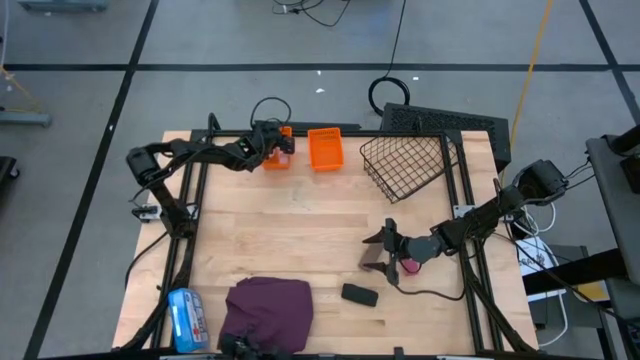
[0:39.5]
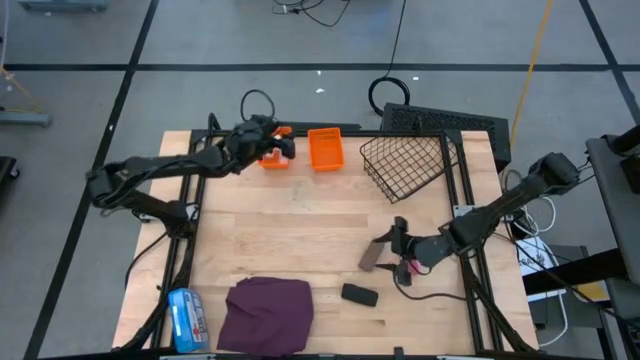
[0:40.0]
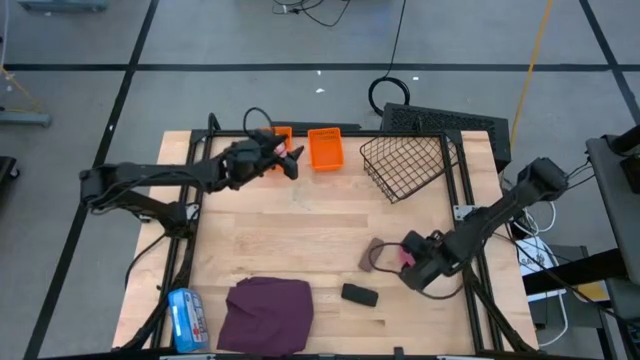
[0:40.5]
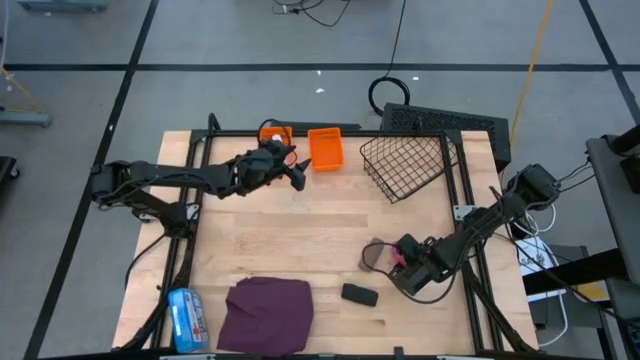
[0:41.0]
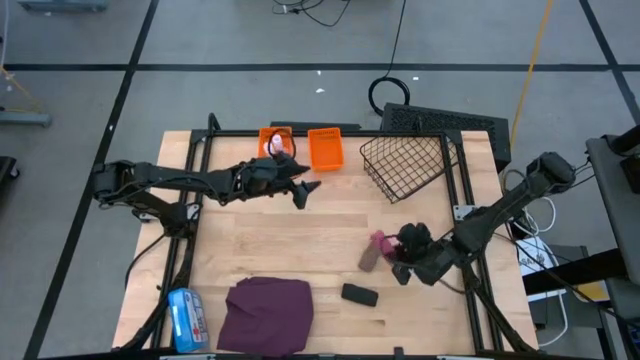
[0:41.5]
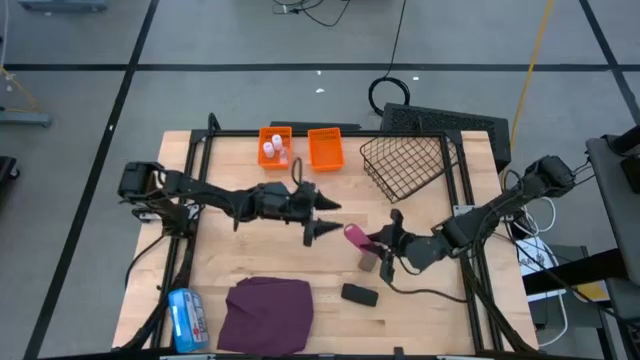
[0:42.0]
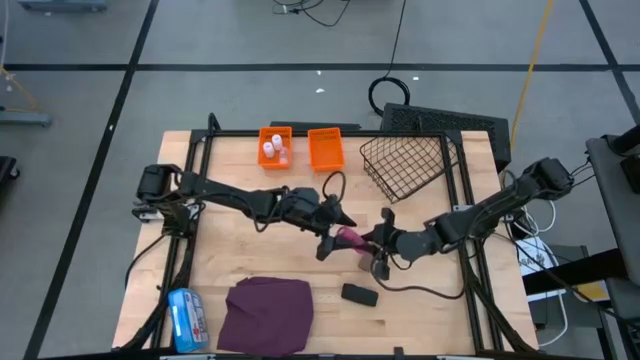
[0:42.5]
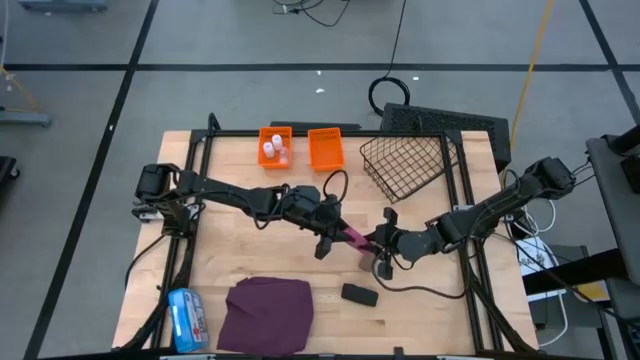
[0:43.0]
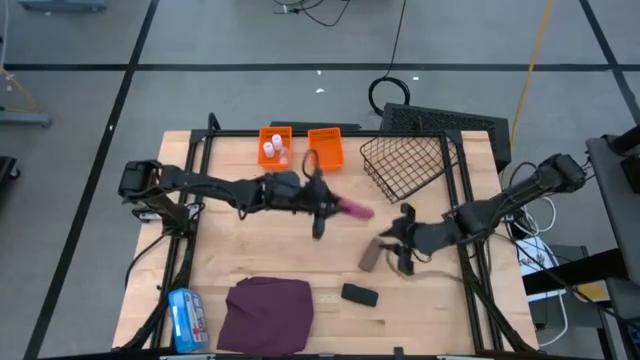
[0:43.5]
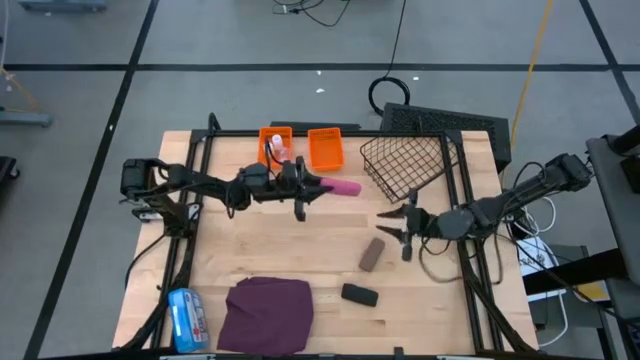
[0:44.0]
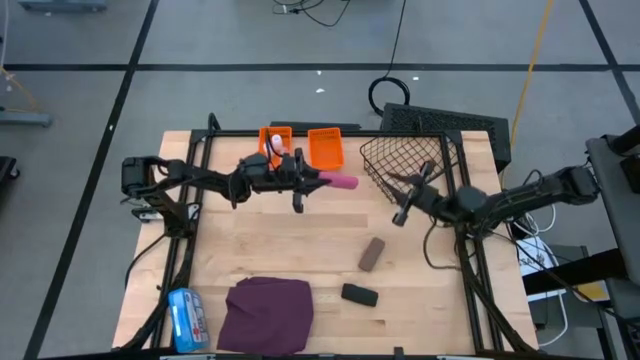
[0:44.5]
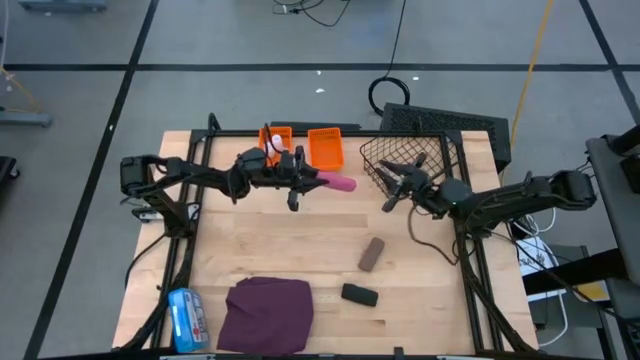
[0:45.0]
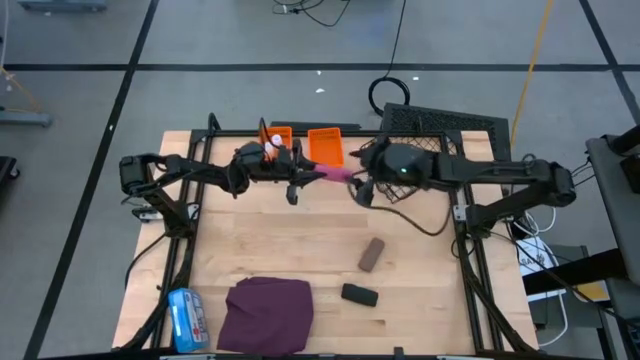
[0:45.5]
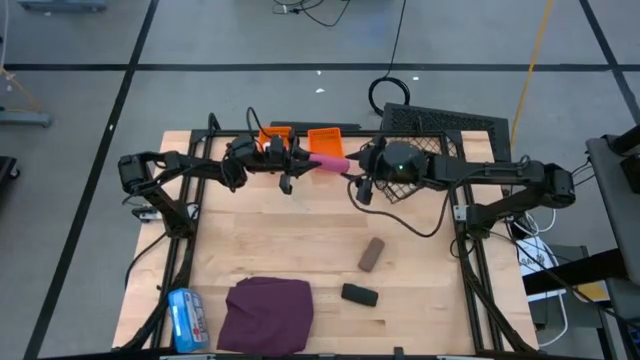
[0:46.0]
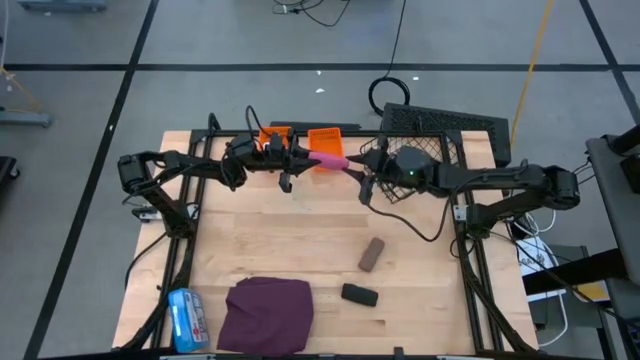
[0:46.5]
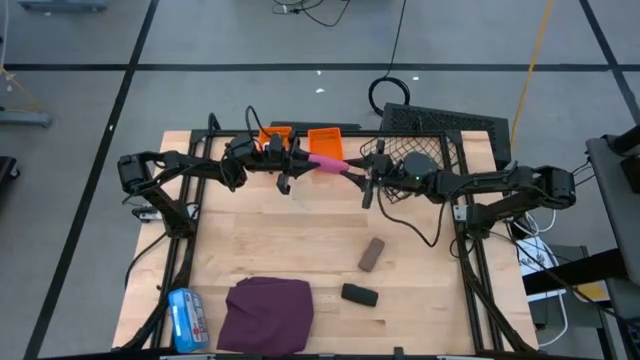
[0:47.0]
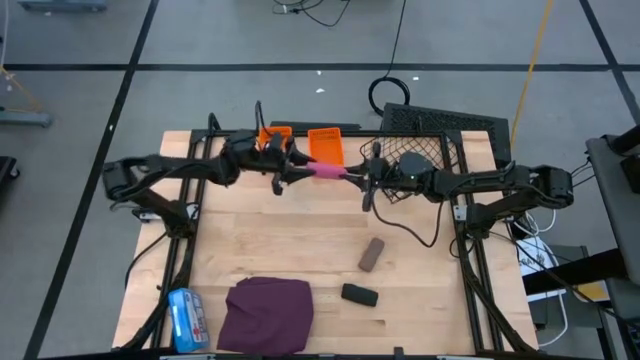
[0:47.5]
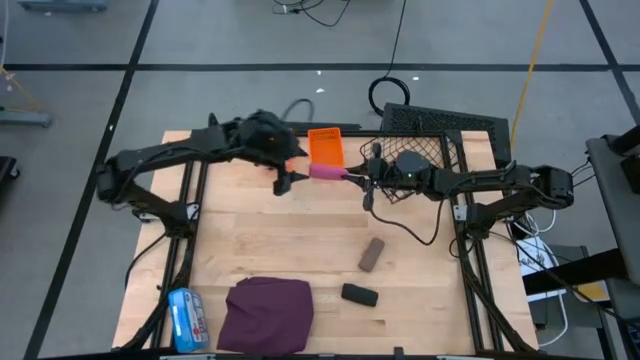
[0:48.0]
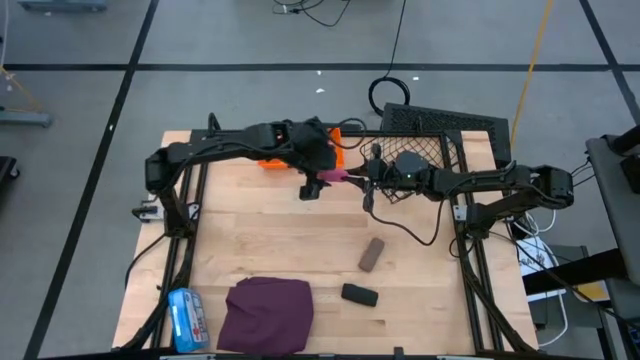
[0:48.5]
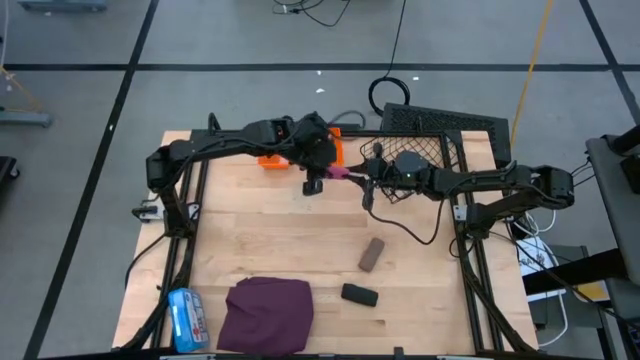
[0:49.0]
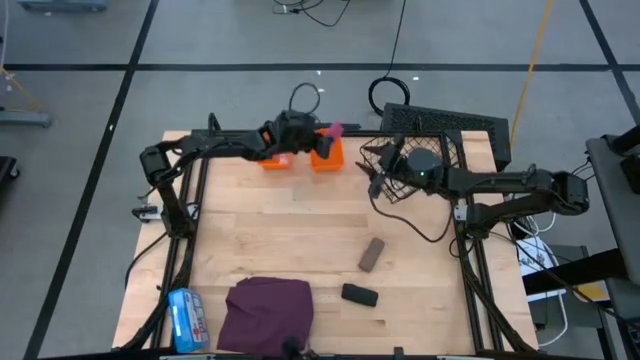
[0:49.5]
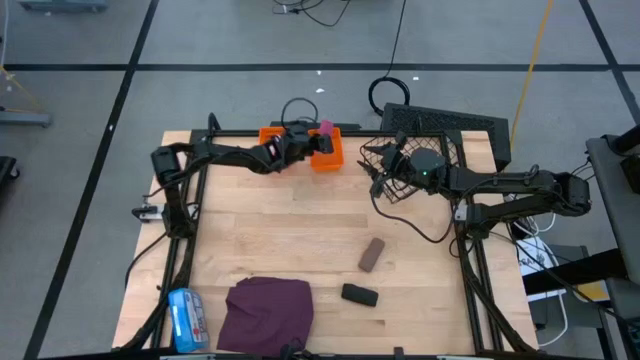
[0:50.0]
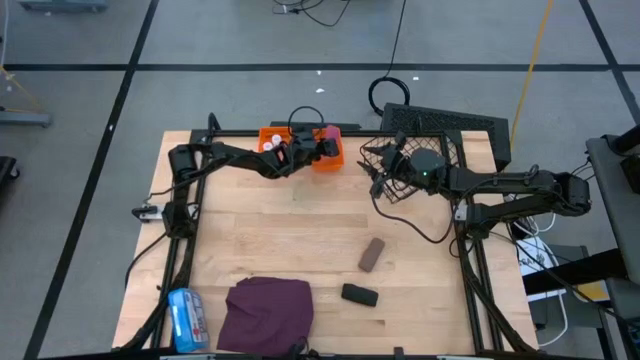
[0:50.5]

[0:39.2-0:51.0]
Task: Pick & Place Medicine items
Put the pink bandage into the right orange bin

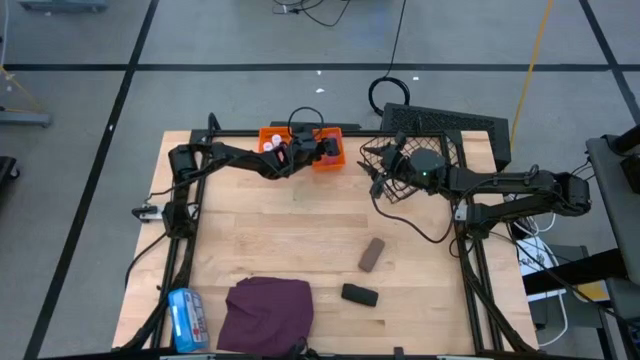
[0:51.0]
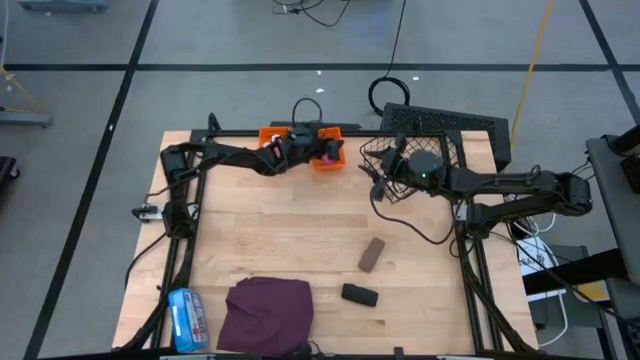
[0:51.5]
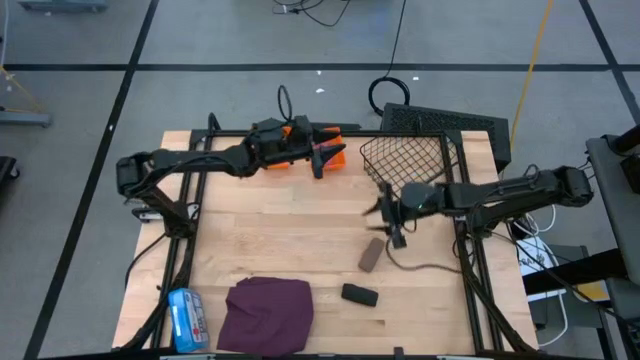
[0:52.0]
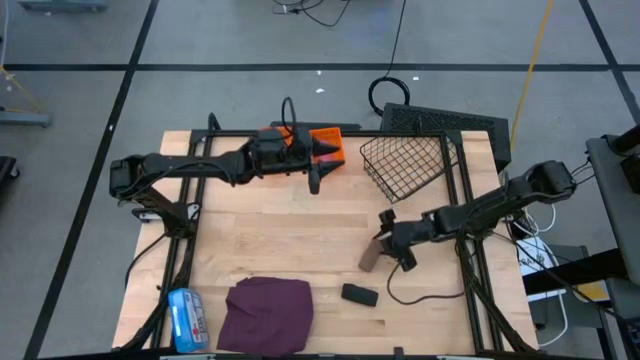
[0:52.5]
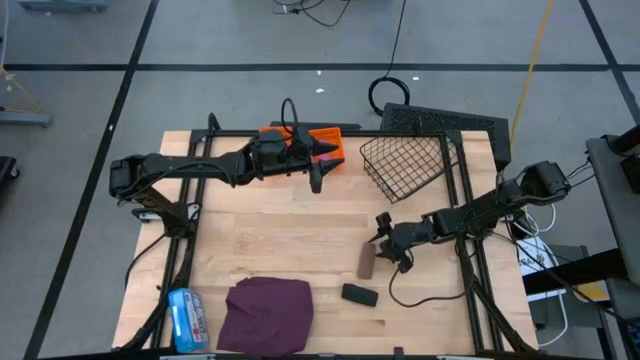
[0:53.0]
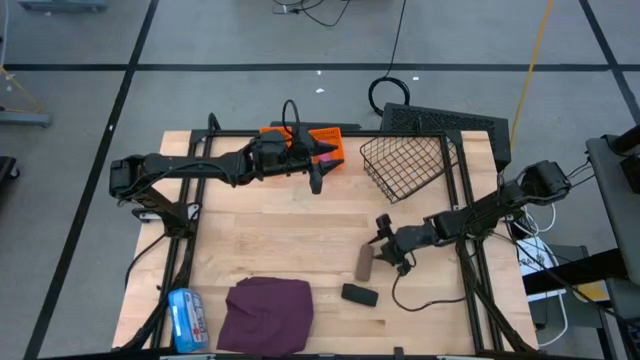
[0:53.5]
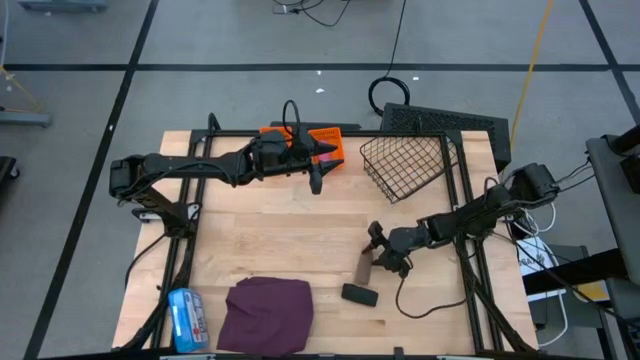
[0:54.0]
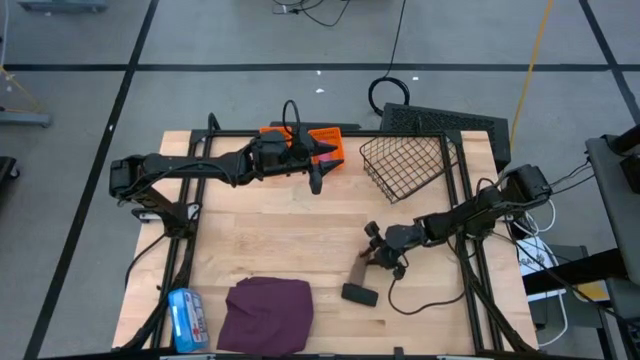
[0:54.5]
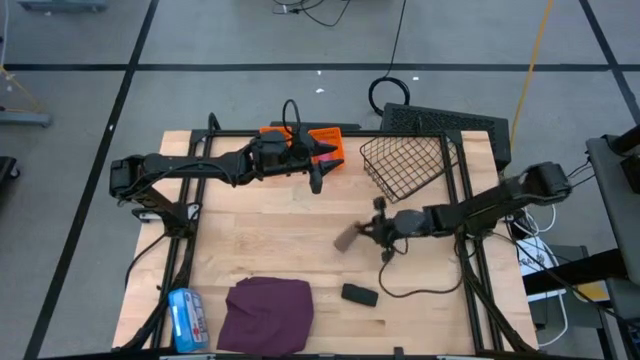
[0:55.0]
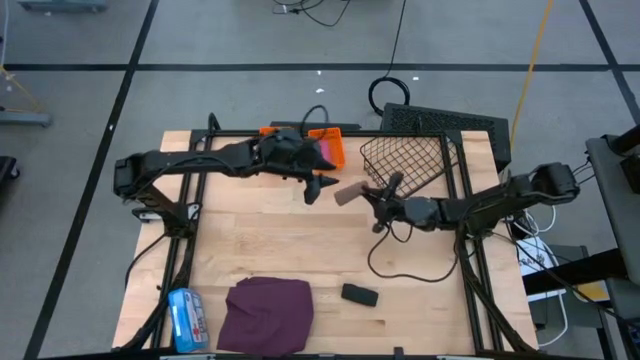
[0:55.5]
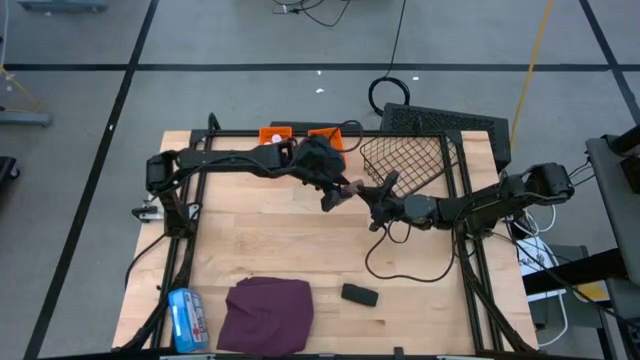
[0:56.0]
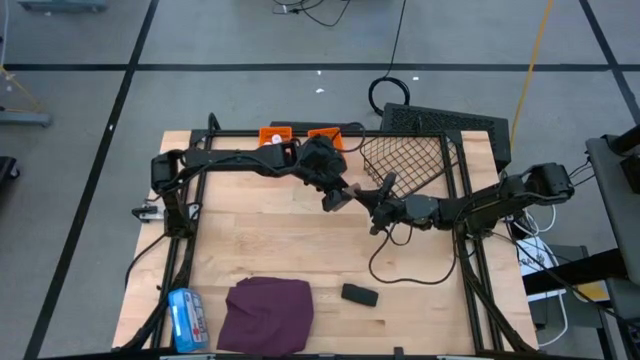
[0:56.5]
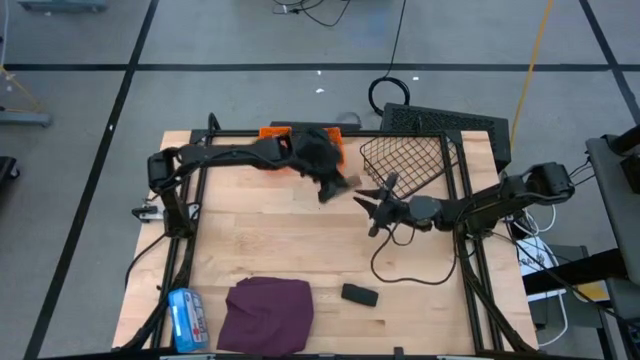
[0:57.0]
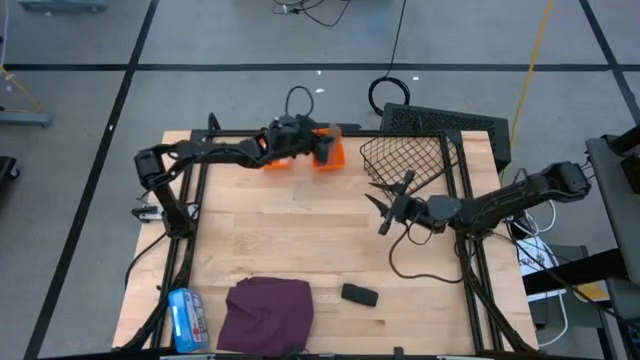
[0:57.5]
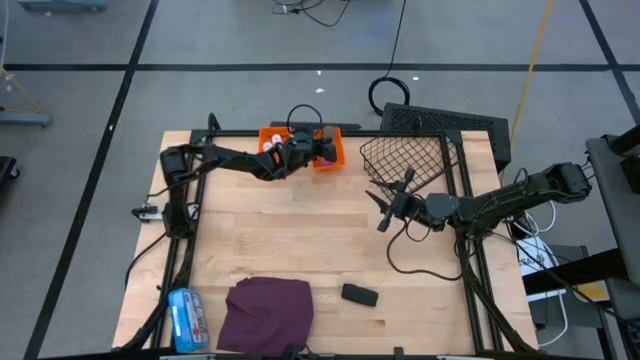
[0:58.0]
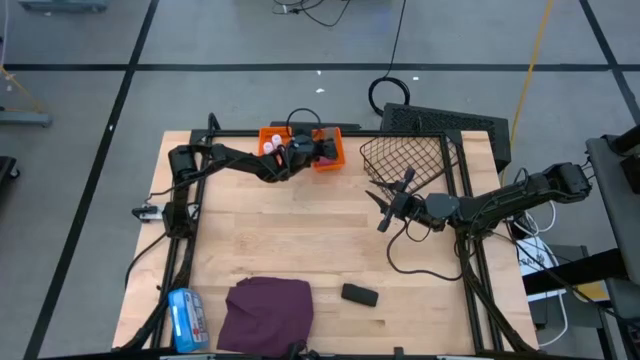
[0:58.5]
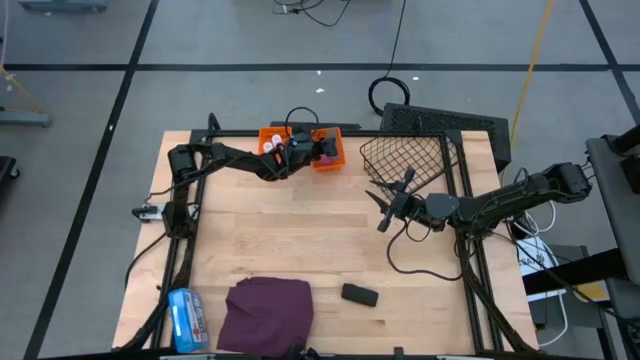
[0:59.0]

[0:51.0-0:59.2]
Put the brown bandage into the right orange bin
